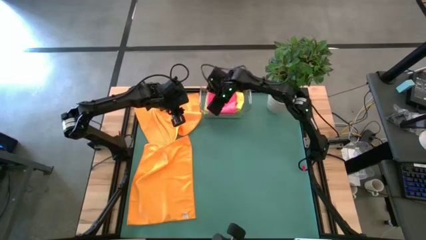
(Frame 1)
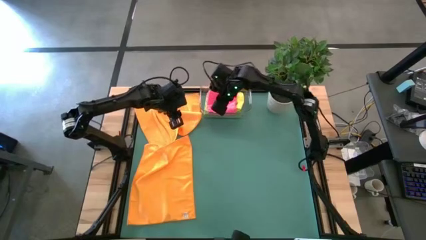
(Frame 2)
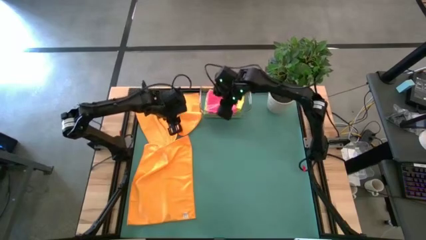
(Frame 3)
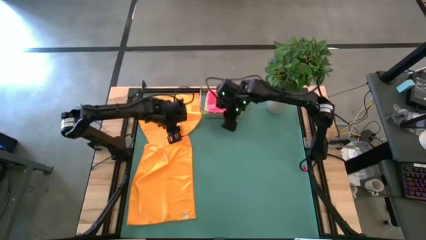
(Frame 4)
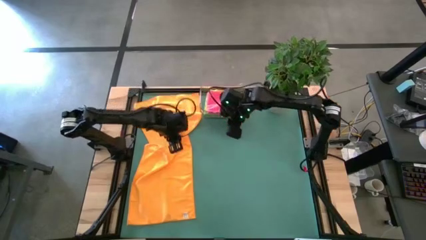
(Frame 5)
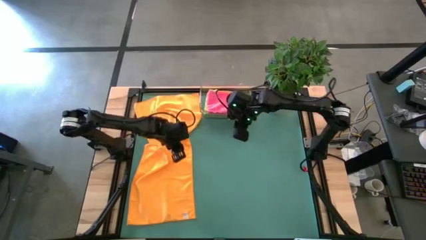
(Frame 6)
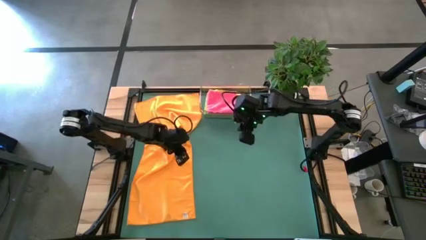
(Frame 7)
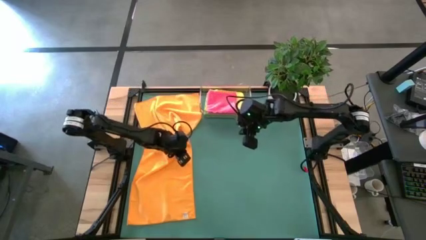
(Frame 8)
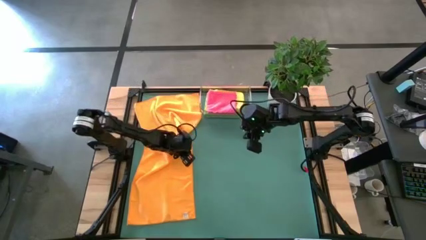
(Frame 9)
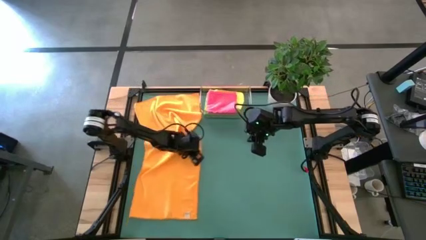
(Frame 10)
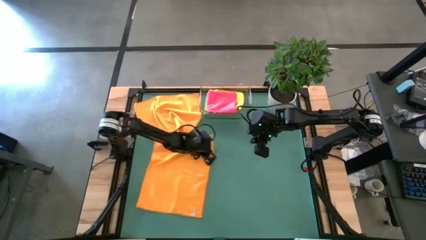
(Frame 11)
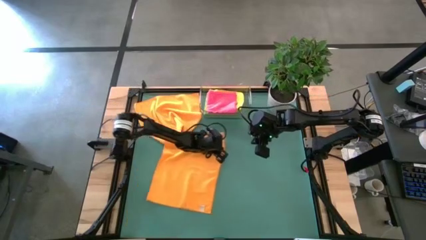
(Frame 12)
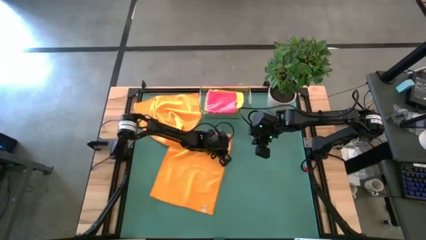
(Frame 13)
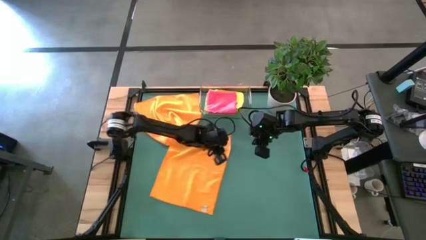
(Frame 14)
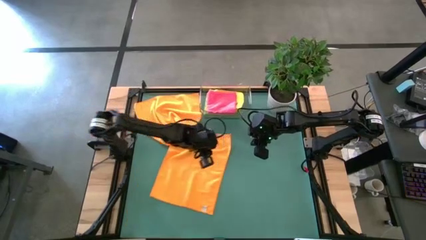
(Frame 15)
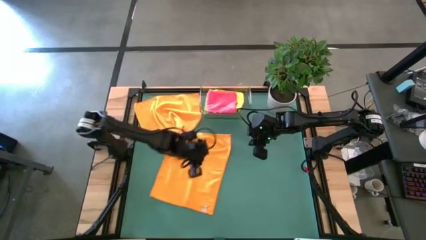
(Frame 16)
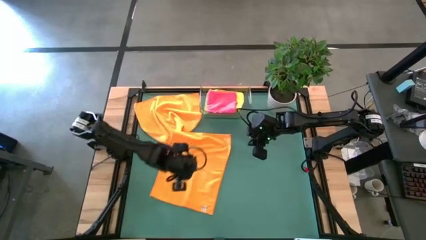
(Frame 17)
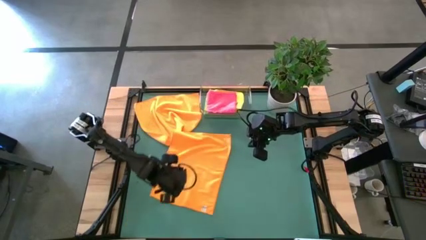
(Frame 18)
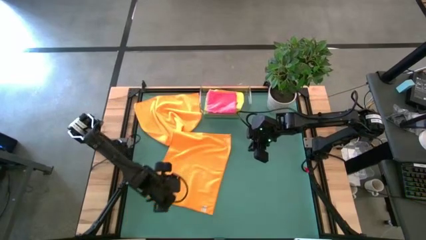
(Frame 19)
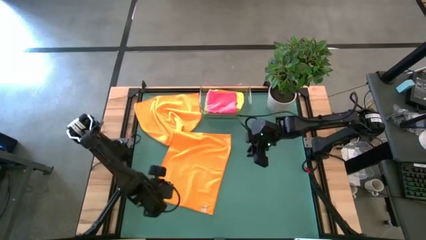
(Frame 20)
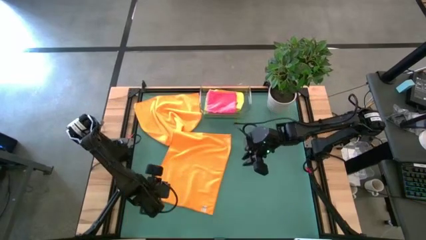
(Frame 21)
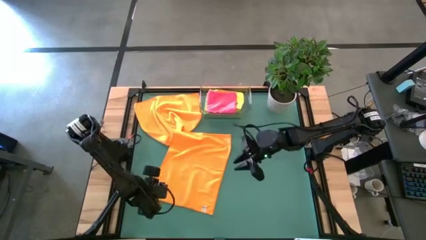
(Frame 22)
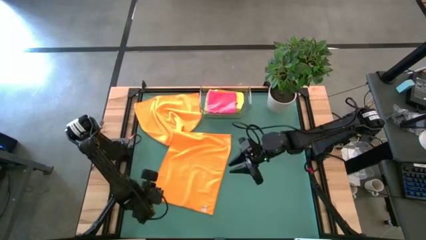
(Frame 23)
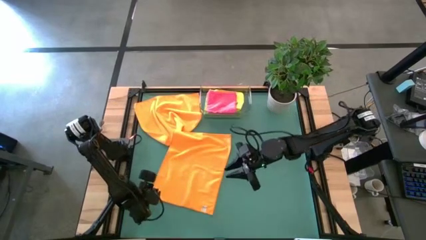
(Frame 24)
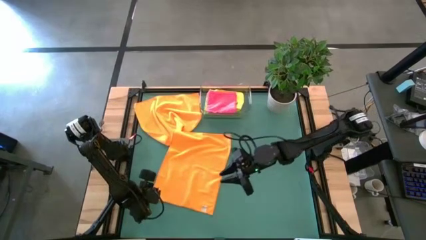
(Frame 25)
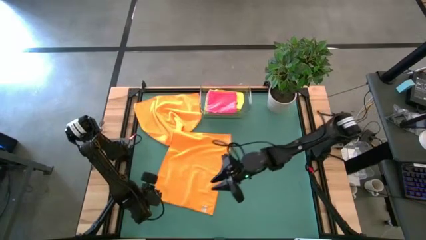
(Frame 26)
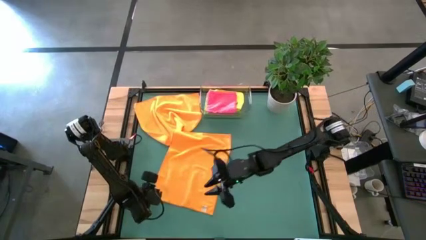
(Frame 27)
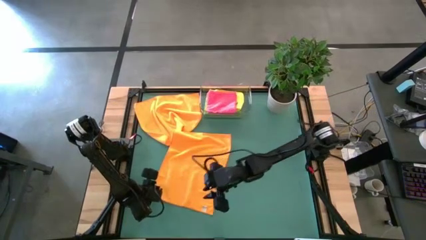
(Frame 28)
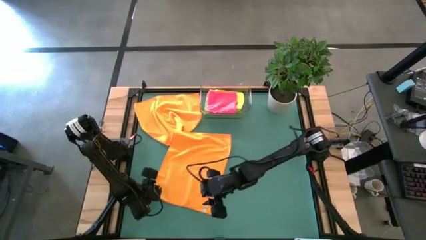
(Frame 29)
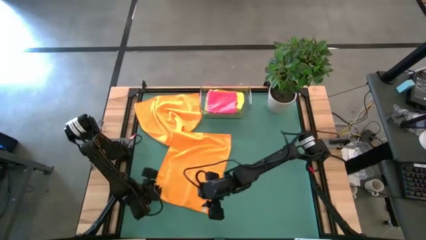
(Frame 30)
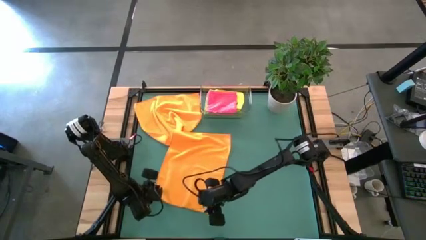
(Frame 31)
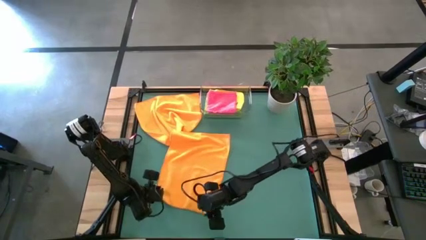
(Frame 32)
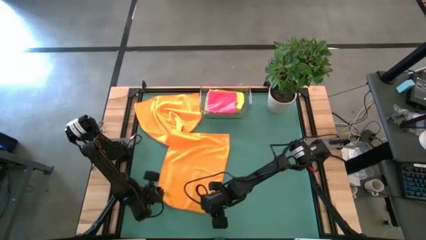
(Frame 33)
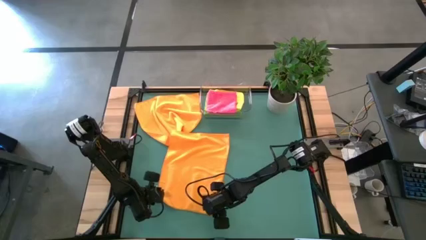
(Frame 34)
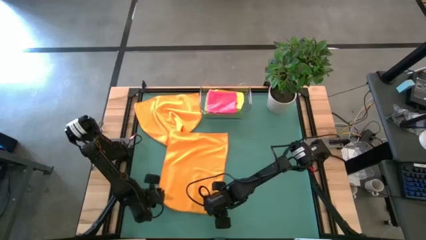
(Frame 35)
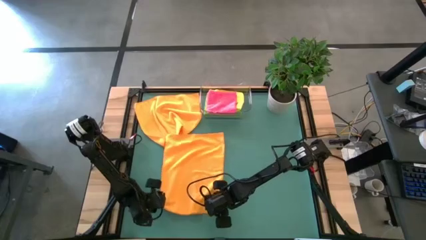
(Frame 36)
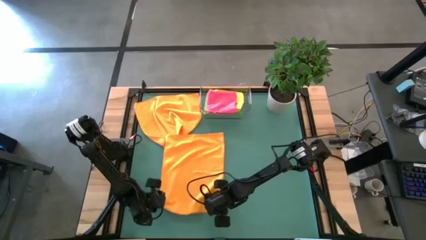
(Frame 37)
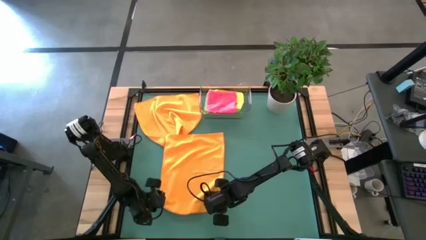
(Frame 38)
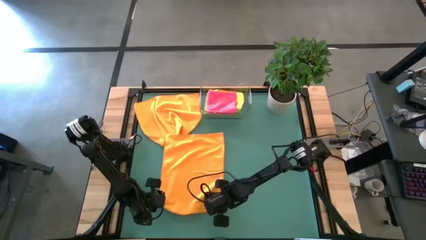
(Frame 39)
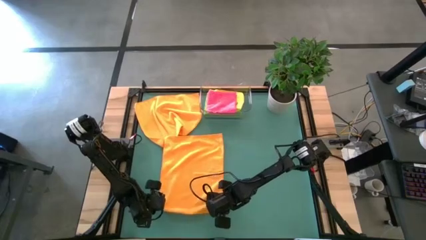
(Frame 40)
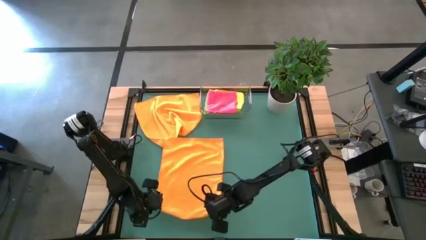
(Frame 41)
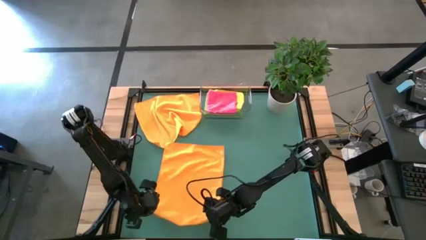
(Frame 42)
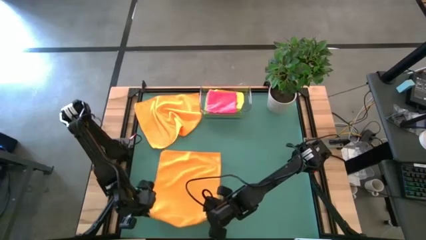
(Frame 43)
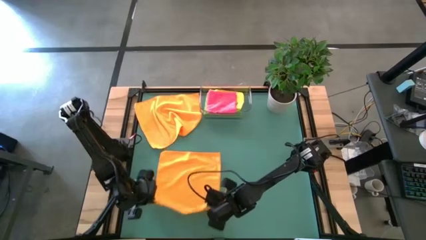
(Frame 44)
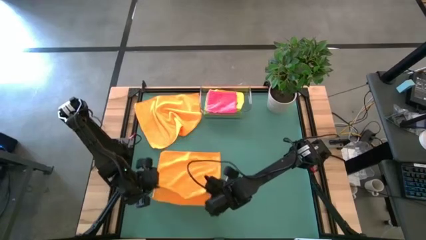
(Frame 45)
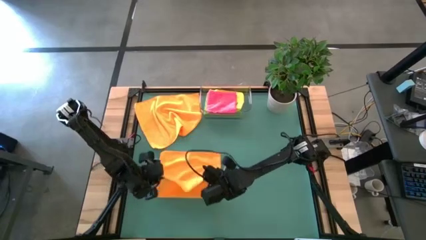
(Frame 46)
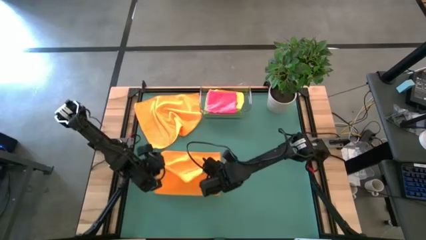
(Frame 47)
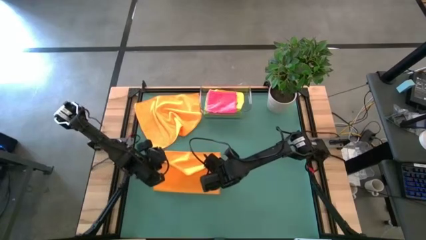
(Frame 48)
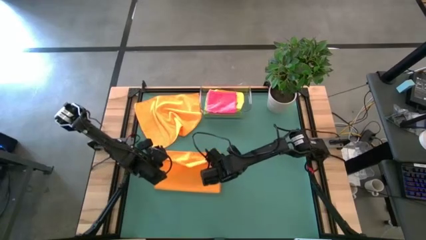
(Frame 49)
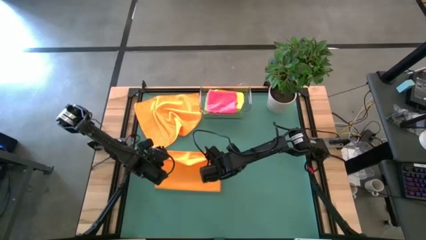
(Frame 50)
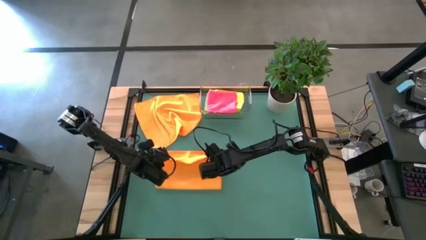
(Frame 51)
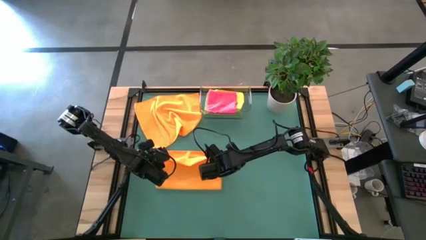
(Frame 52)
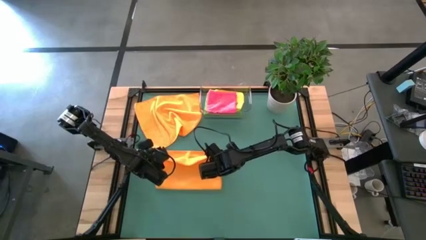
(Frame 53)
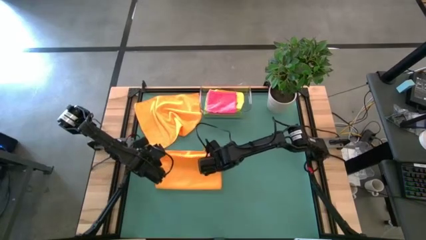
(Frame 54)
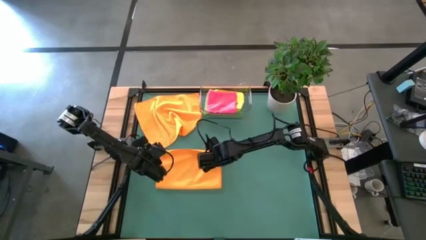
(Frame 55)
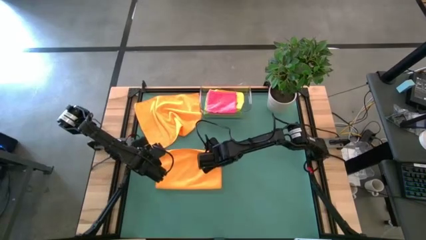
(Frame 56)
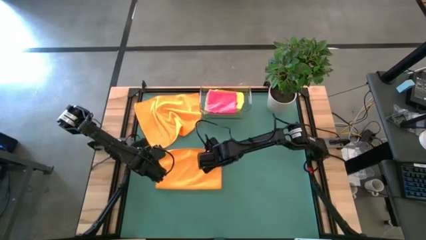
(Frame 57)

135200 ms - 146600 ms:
Task: Fold microfiber towels
Fold the bottom orange towel

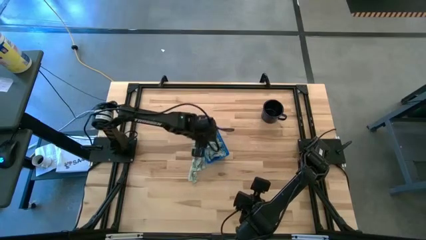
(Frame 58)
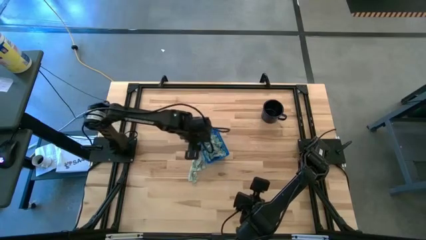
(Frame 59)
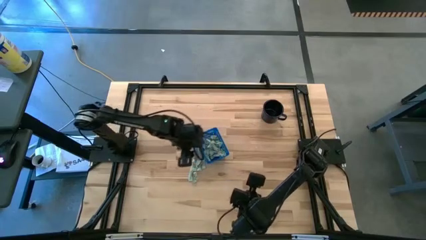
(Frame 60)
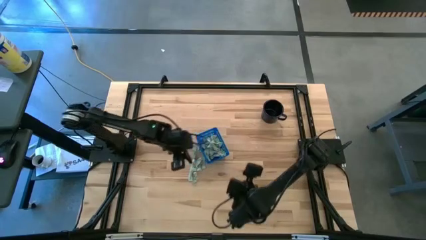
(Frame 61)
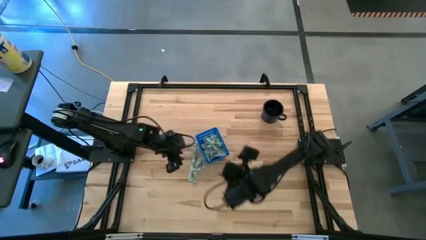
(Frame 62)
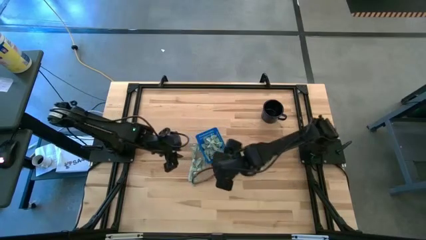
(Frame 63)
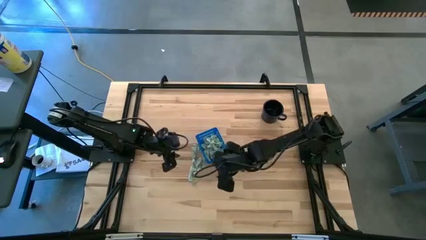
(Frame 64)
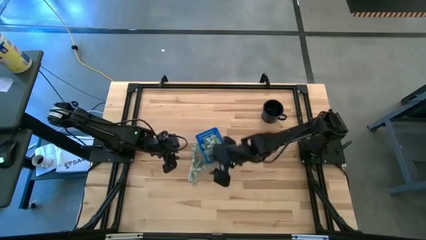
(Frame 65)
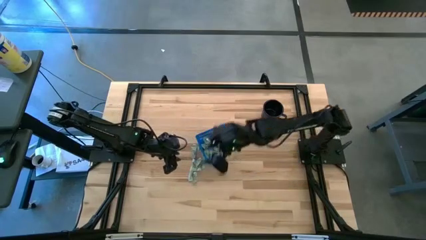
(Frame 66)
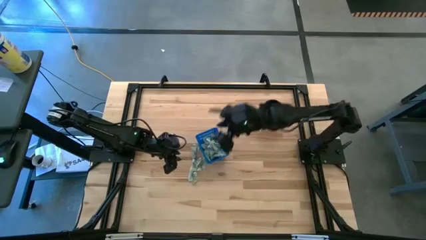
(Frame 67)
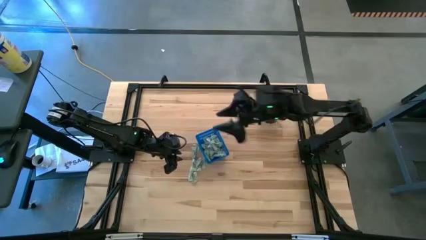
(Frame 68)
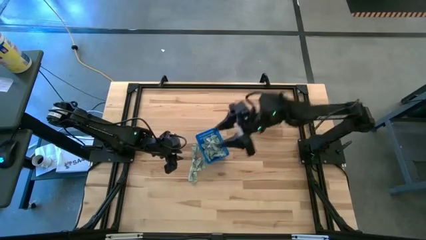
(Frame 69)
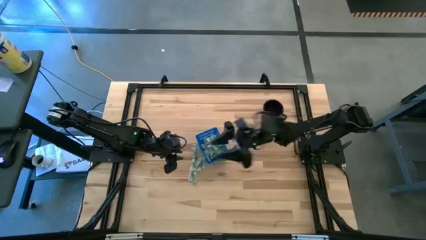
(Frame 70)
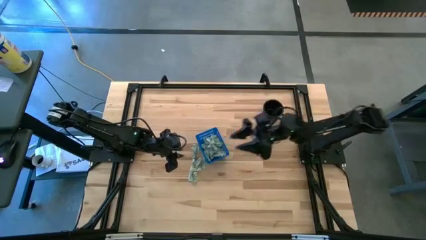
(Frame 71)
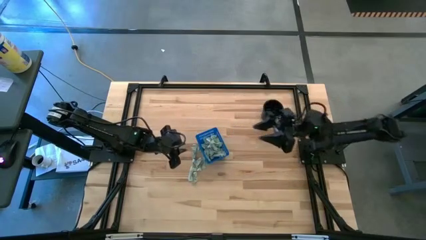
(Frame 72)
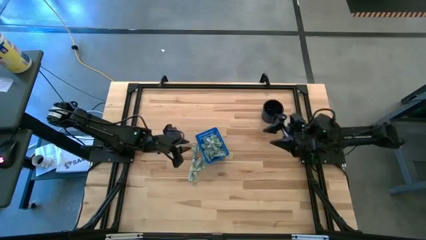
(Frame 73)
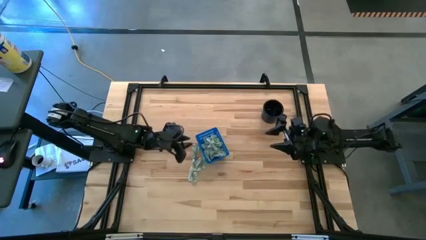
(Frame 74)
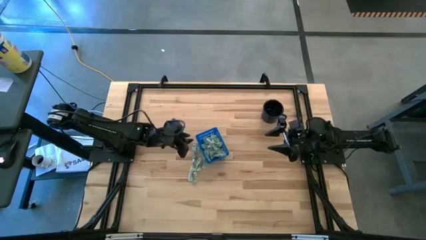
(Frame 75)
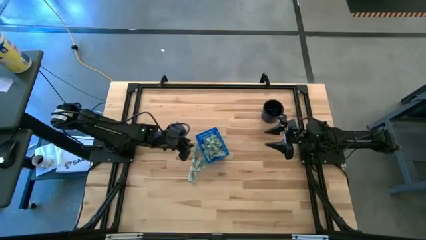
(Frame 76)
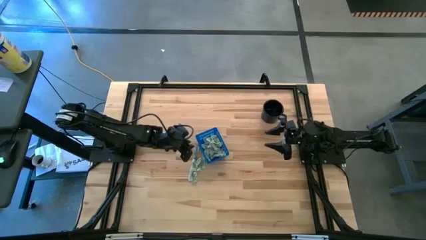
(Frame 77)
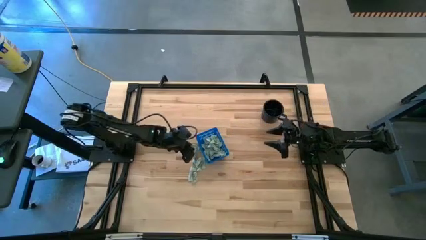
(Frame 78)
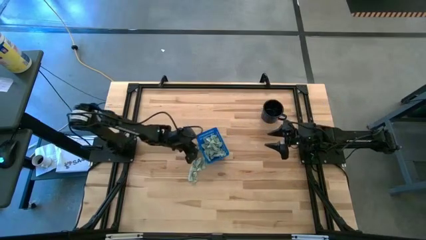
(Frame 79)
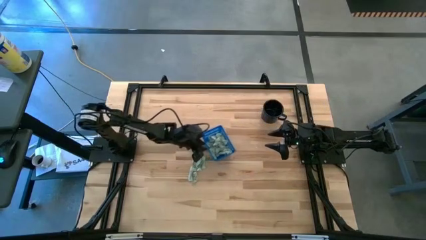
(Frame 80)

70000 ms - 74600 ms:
Task: Pick and place Stevia / Truvia into bins
Adjust the basket on the table

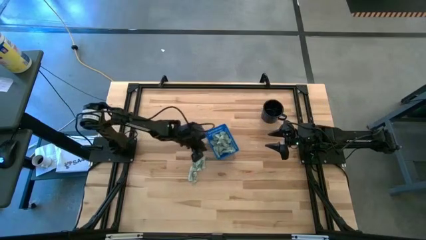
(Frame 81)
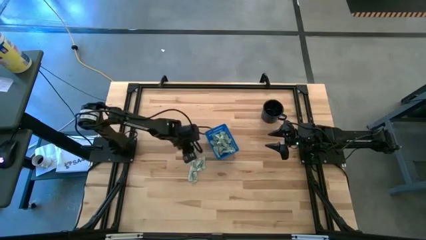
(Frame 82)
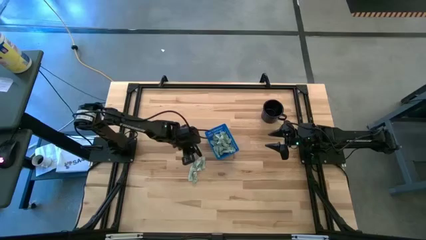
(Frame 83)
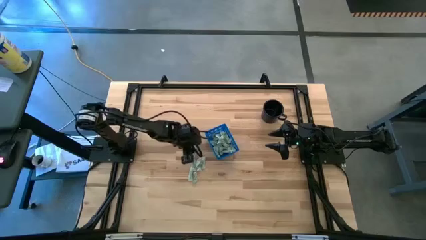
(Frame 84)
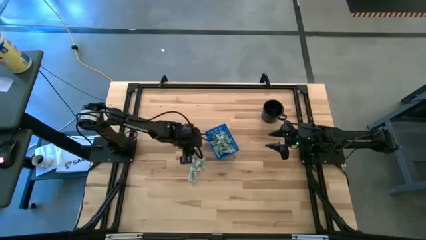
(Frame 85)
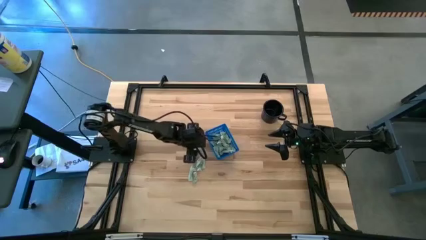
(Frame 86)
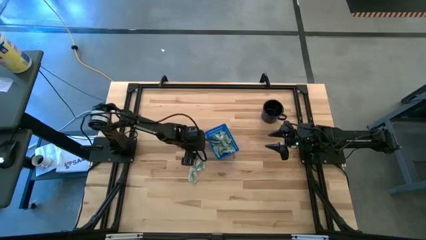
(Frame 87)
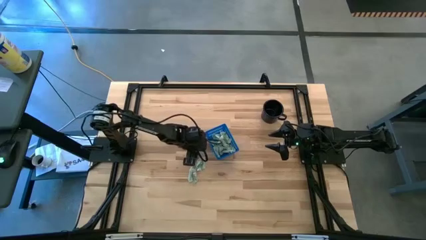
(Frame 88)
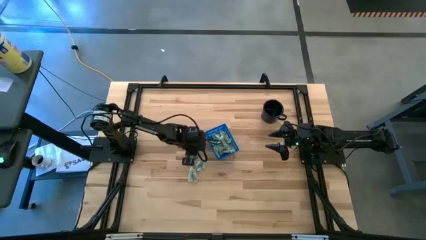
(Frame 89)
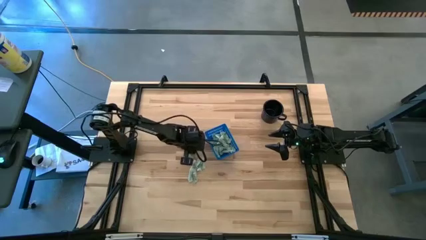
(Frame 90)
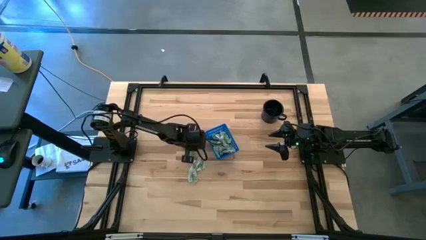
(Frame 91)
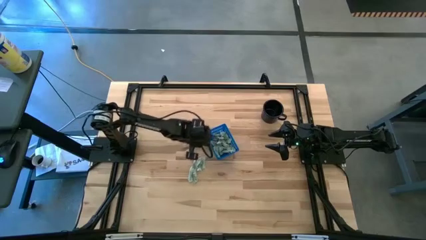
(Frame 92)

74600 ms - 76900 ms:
Put the stevia packet into the basket
